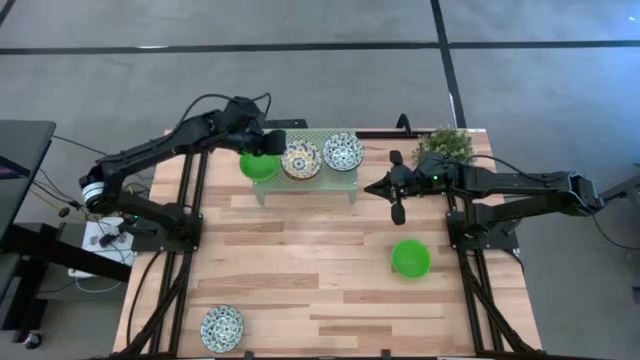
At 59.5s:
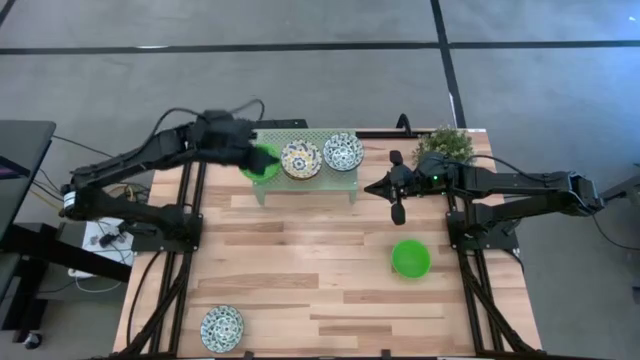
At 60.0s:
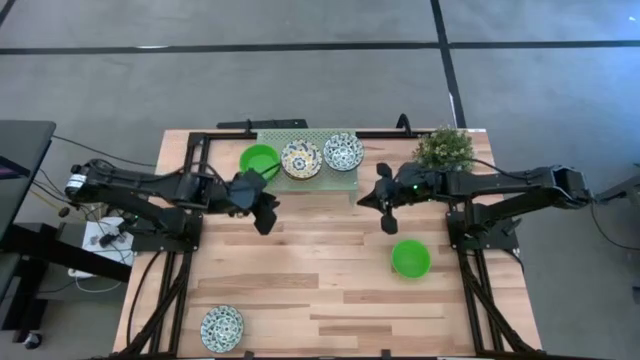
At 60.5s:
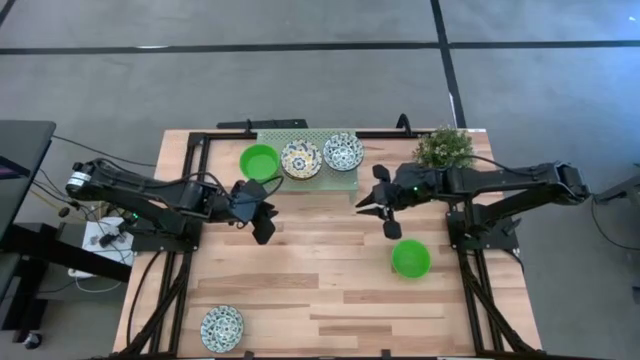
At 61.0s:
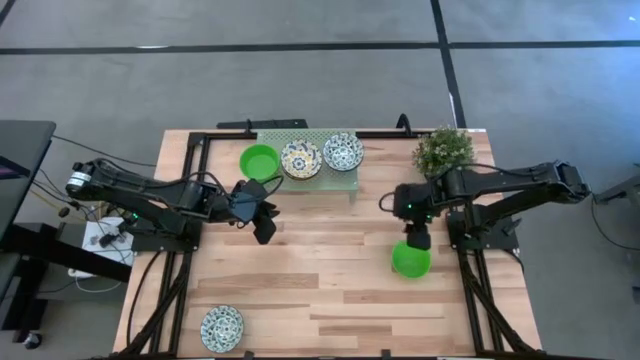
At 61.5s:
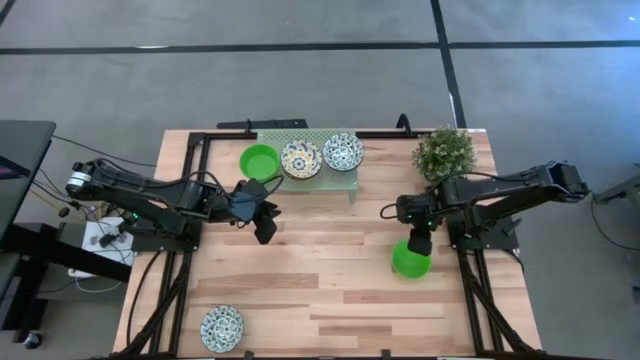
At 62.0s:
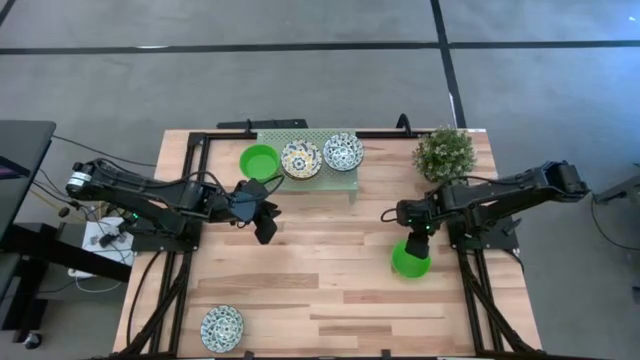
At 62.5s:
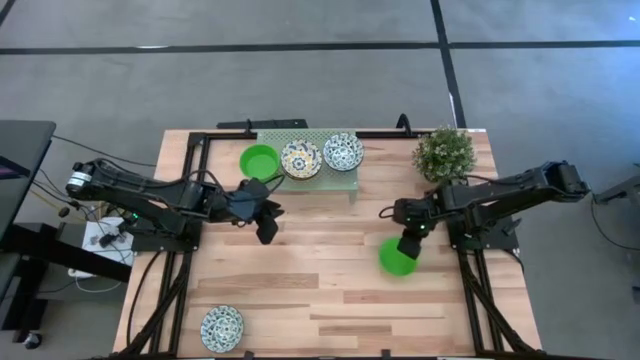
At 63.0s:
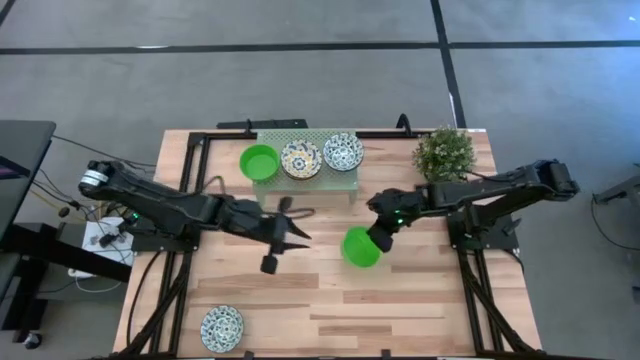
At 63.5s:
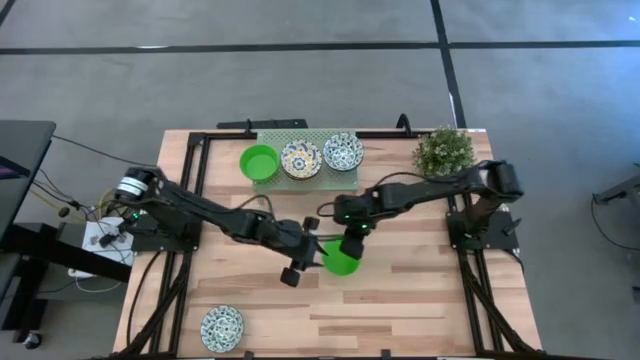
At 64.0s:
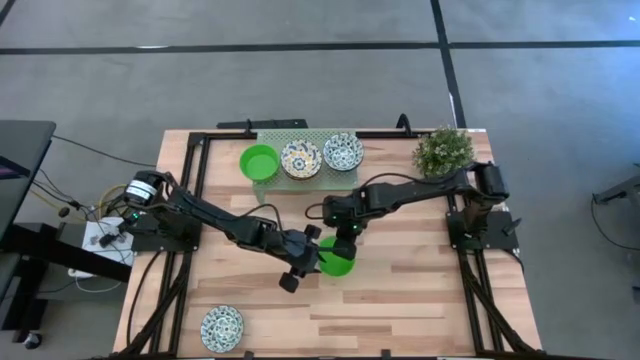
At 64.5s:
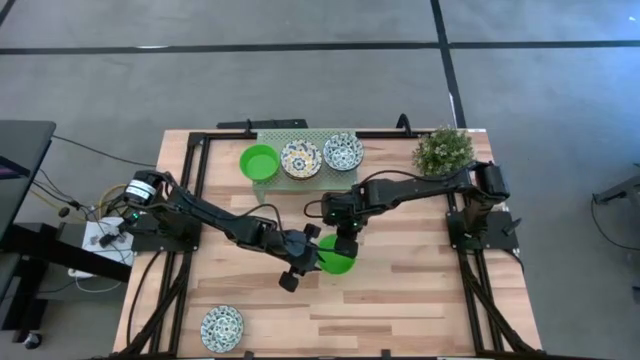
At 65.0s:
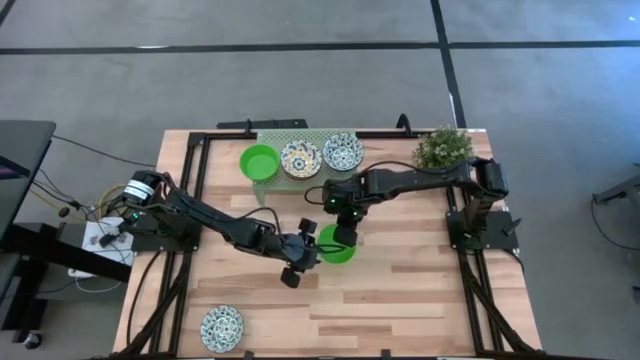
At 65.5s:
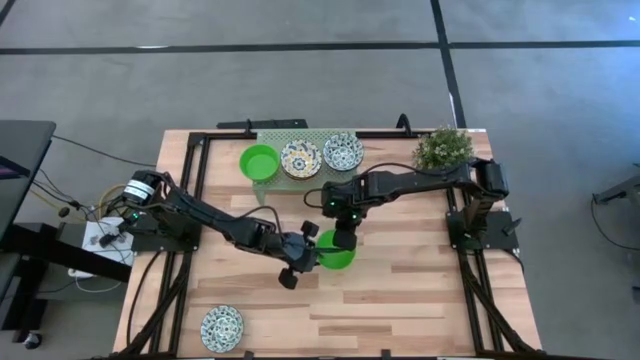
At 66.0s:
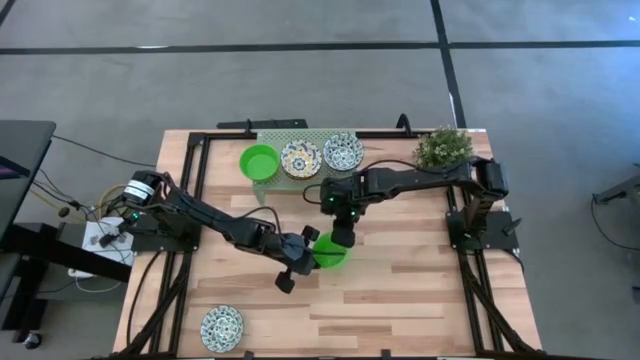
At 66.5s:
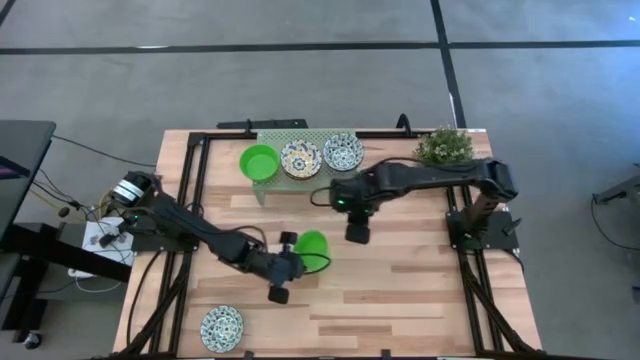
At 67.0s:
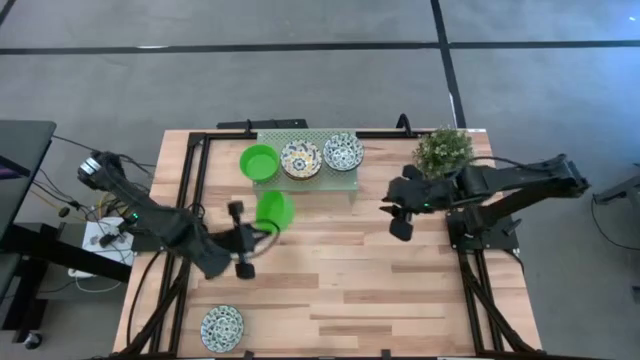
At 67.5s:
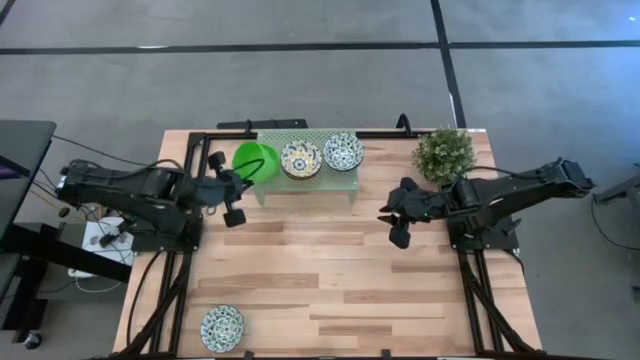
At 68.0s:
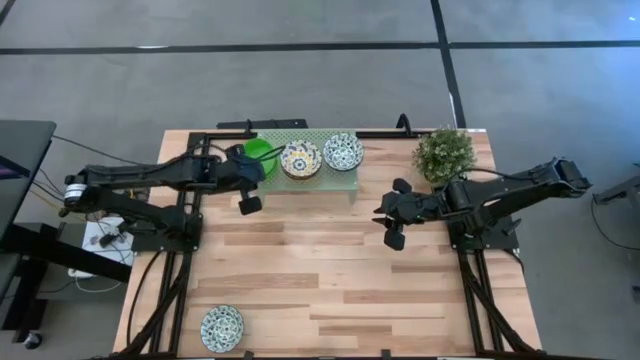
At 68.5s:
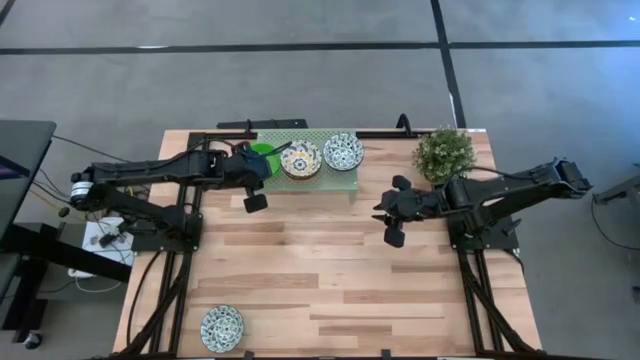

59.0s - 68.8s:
Task: Pick & Place Mini bowls
Stack the green bowl on the green bowls on the shelf

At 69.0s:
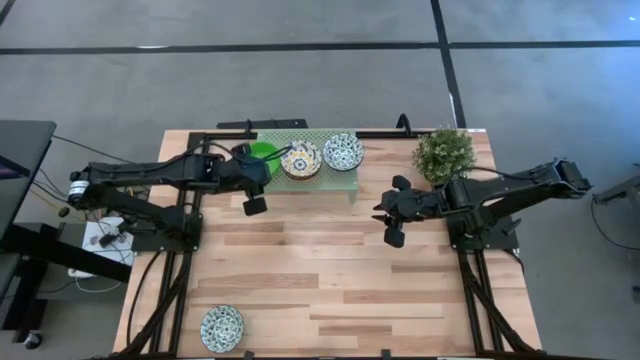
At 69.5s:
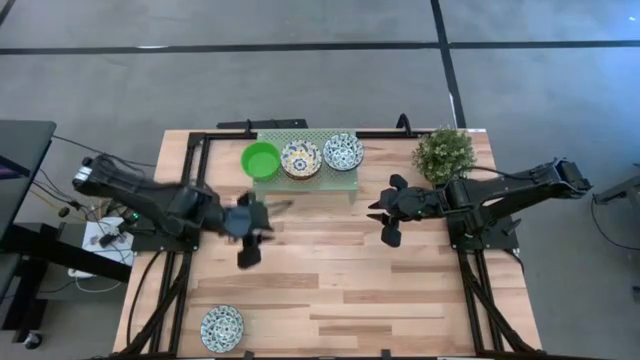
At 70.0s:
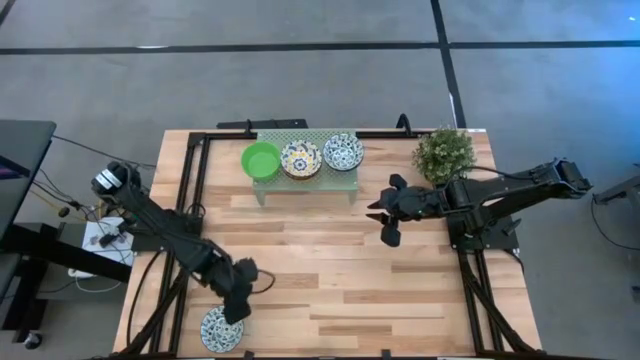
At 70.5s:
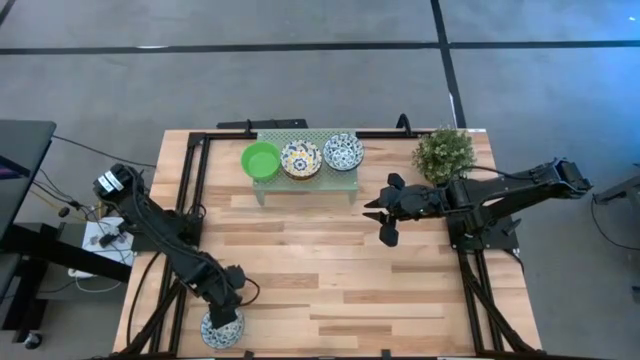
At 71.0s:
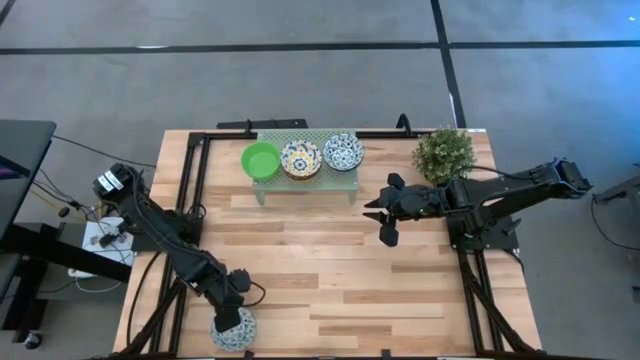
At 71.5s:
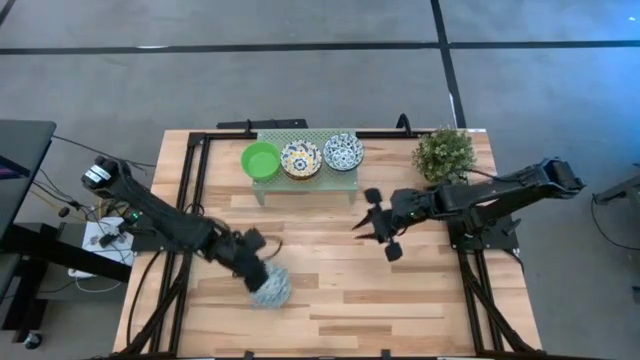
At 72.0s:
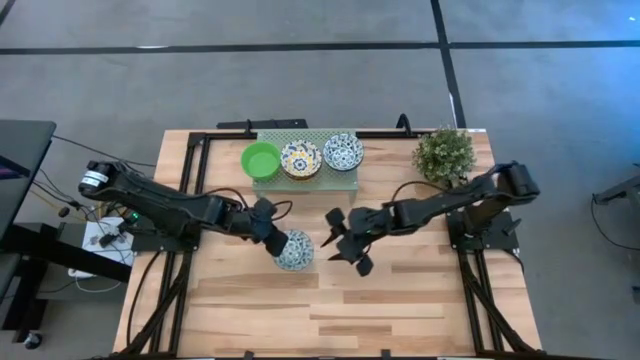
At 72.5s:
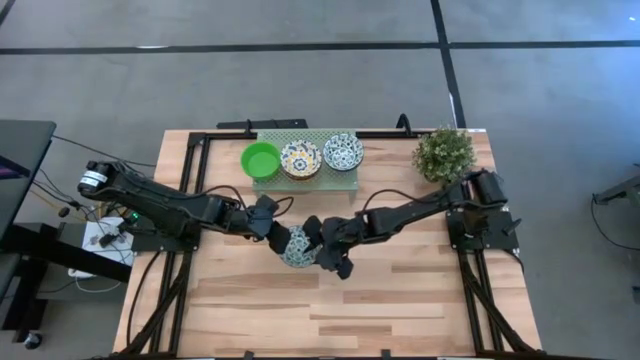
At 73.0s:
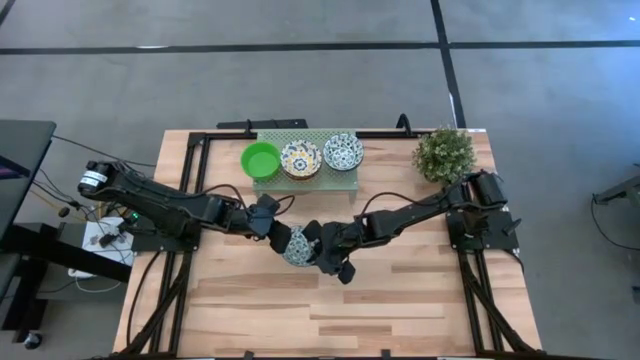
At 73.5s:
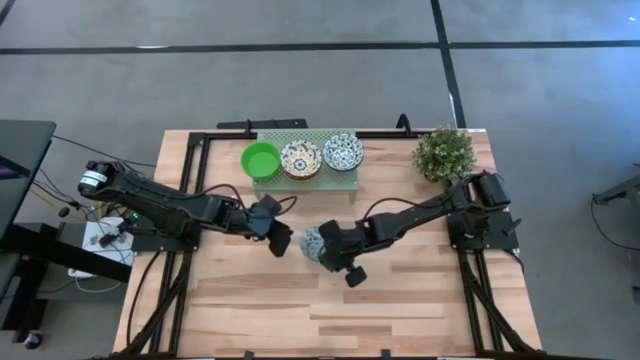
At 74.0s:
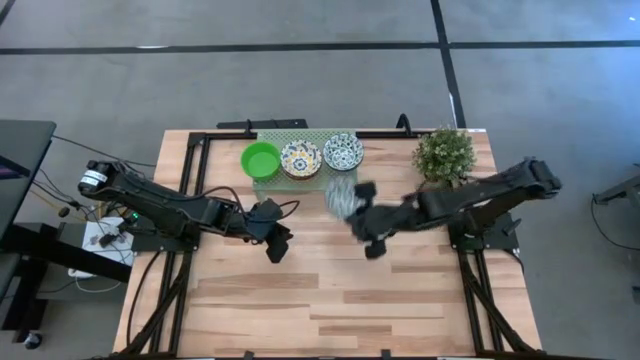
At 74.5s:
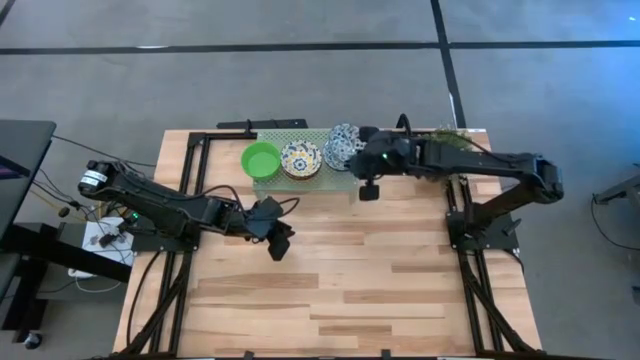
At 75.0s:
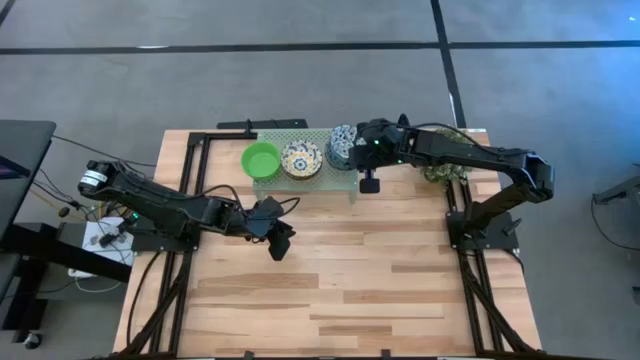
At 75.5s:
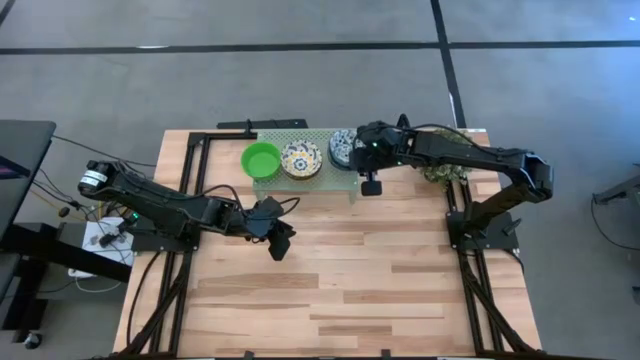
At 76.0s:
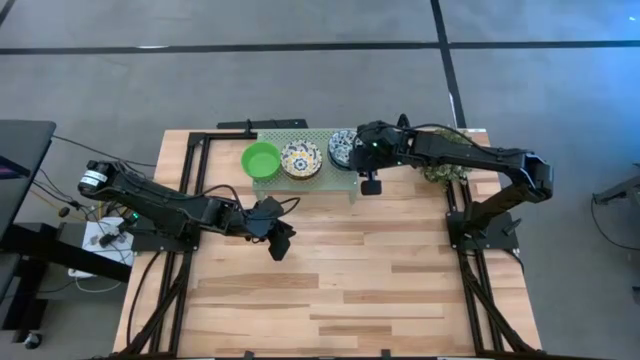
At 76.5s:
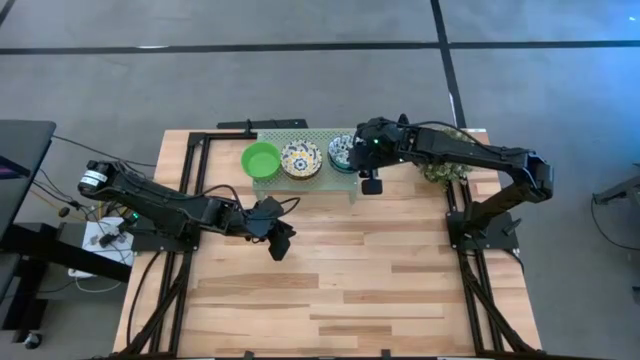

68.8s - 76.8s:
Stack the blue patterned bowl on the blue patterned bowls on the shelf

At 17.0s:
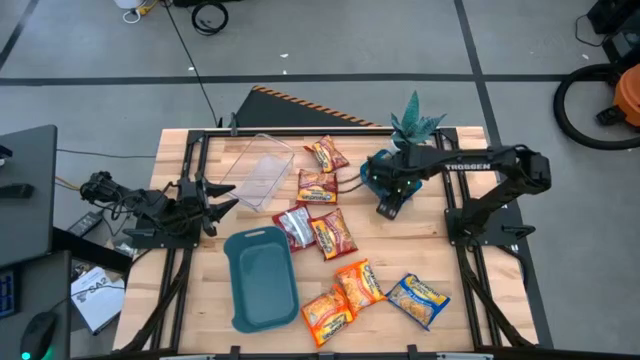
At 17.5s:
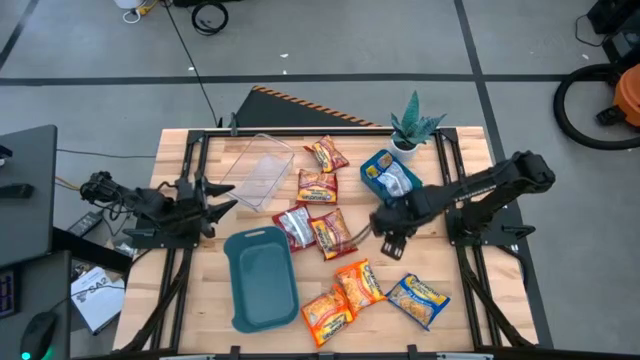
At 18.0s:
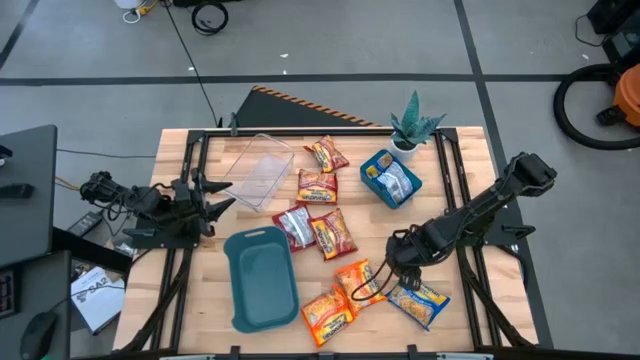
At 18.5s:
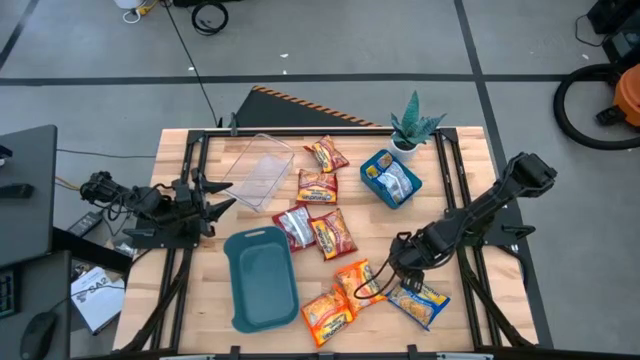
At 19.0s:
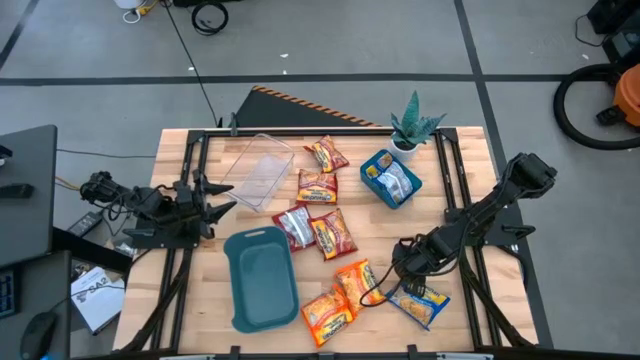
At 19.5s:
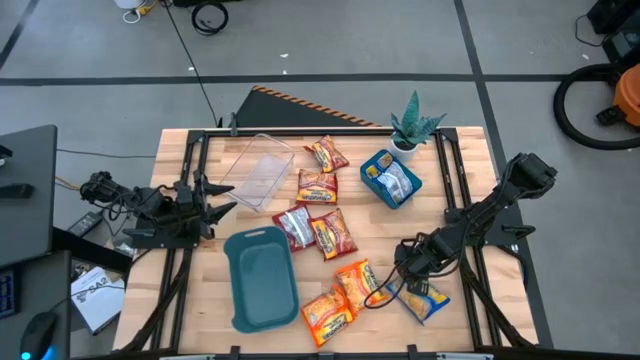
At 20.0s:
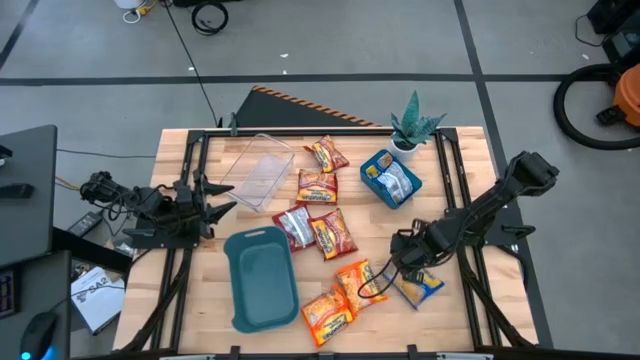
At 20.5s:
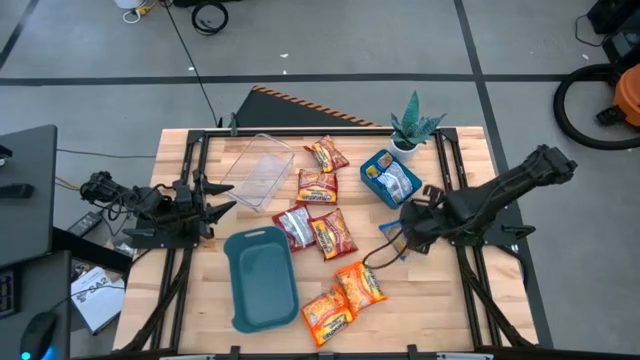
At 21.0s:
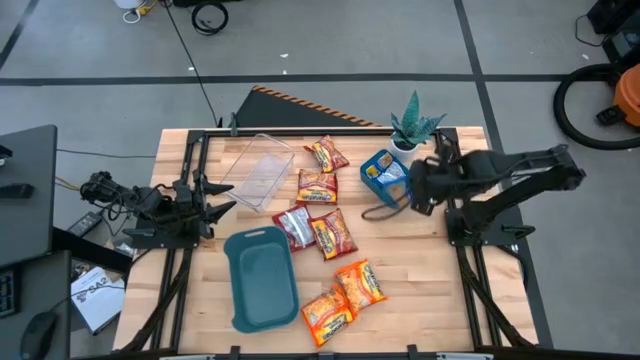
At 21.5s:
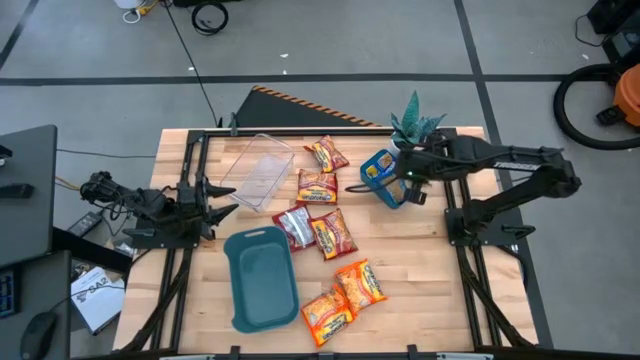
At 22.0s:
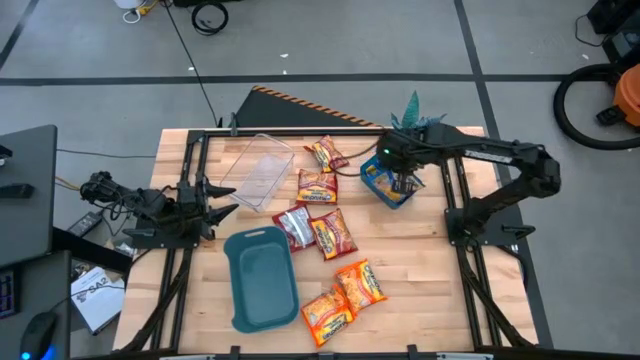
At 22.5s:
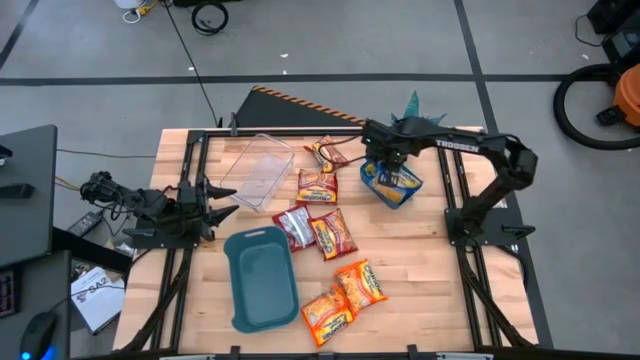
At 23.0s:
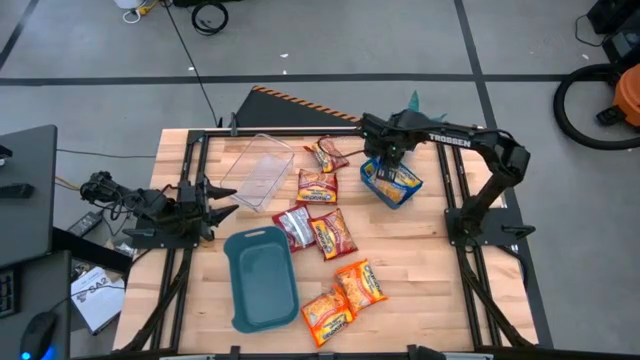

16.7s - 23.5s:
Task: Sort Maruchan noodles
Put the blue noodle pack into the blue bin
